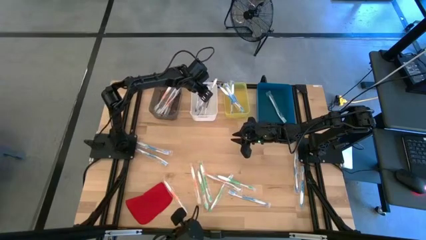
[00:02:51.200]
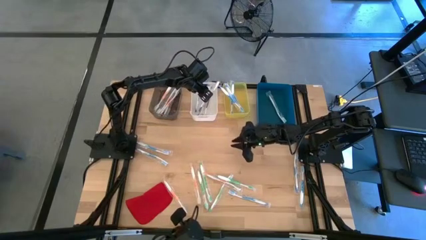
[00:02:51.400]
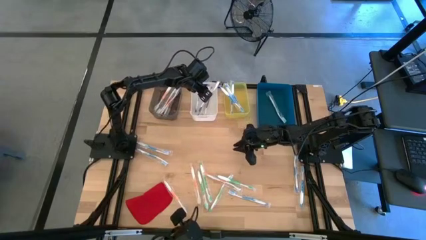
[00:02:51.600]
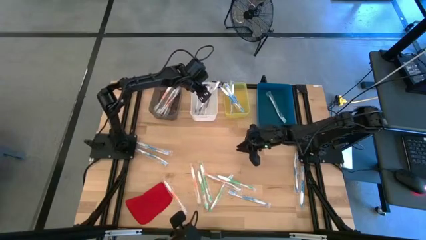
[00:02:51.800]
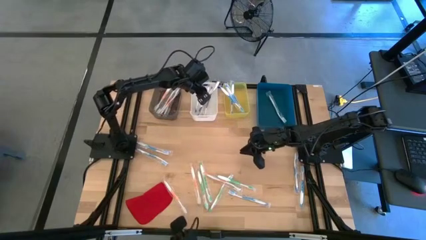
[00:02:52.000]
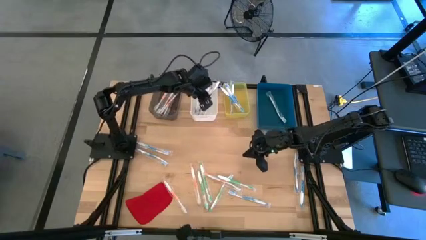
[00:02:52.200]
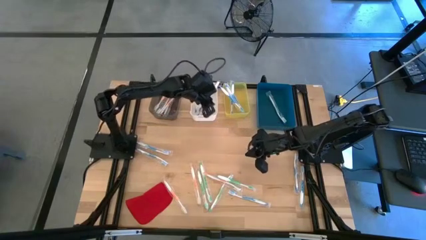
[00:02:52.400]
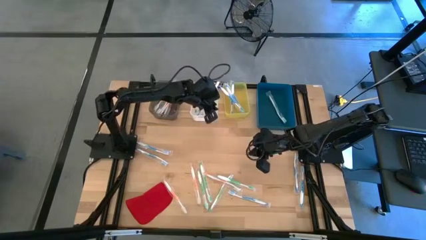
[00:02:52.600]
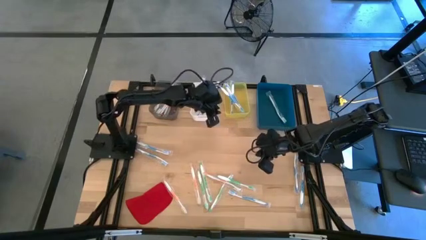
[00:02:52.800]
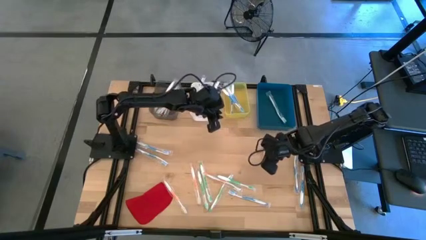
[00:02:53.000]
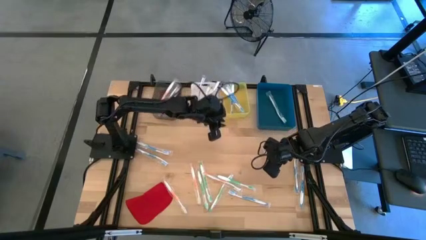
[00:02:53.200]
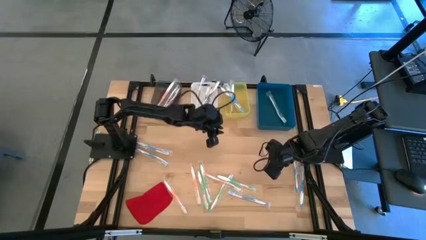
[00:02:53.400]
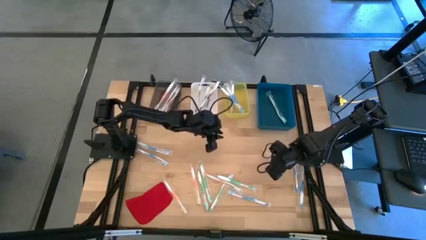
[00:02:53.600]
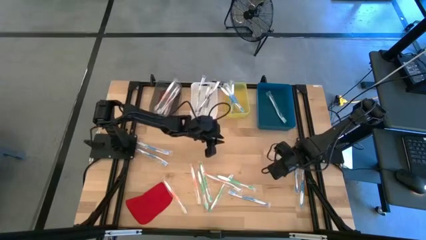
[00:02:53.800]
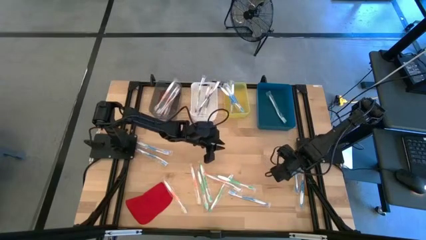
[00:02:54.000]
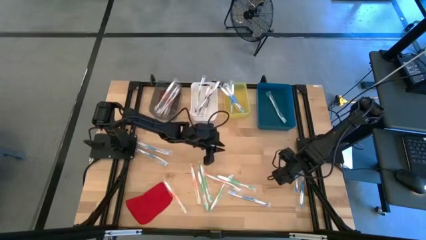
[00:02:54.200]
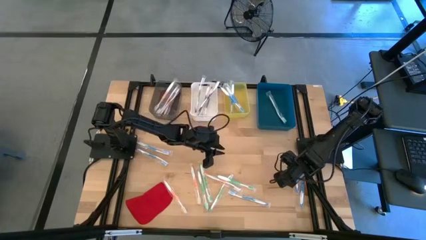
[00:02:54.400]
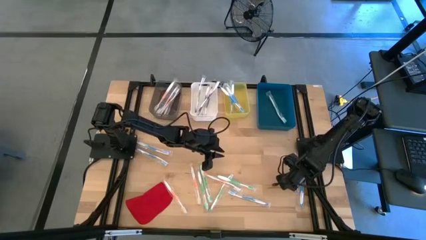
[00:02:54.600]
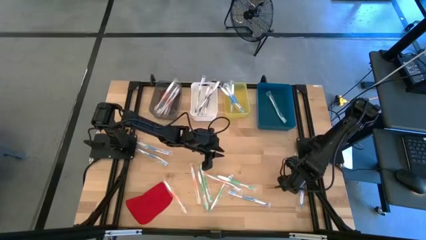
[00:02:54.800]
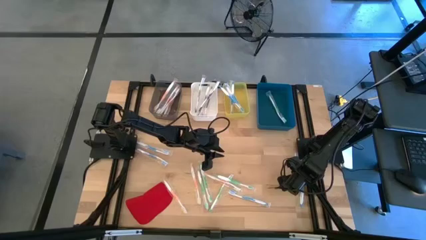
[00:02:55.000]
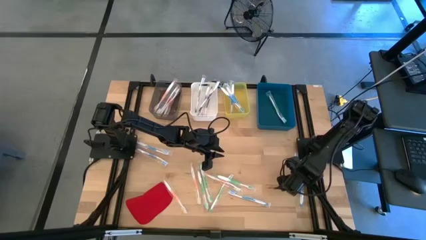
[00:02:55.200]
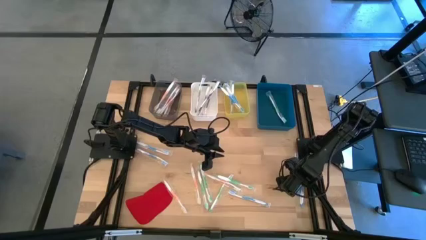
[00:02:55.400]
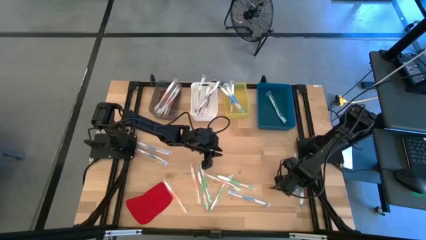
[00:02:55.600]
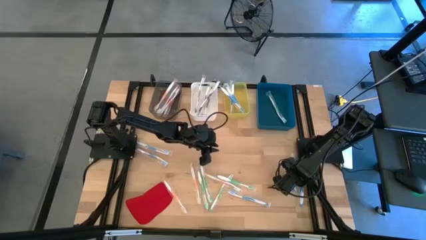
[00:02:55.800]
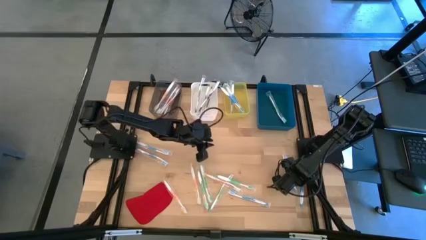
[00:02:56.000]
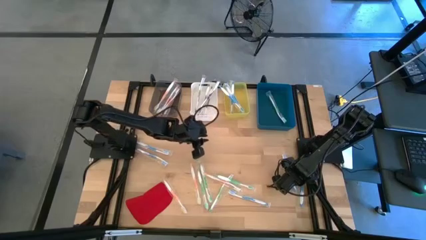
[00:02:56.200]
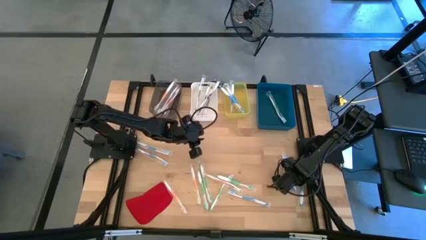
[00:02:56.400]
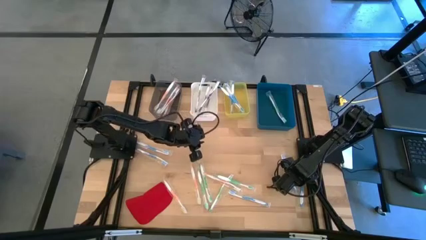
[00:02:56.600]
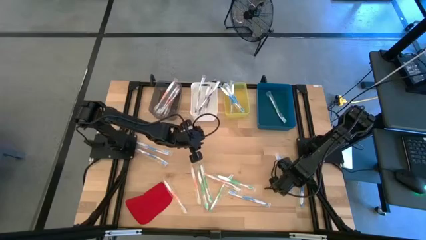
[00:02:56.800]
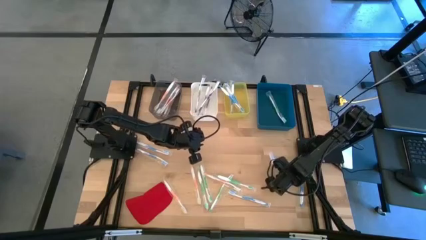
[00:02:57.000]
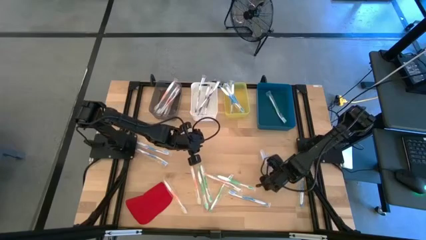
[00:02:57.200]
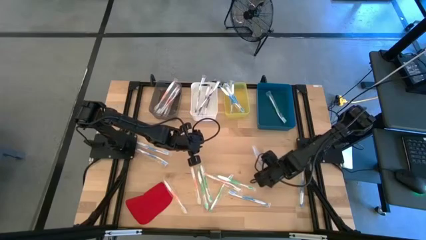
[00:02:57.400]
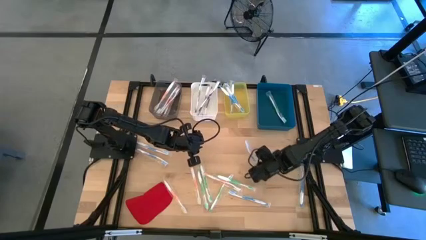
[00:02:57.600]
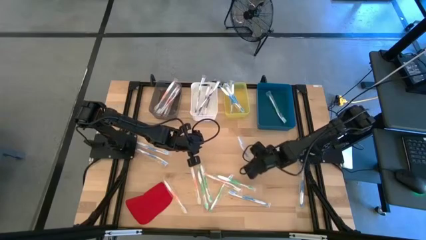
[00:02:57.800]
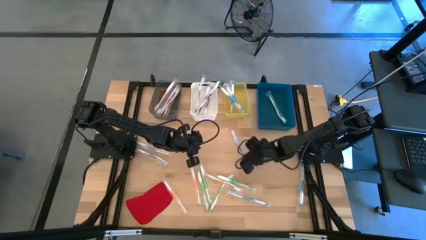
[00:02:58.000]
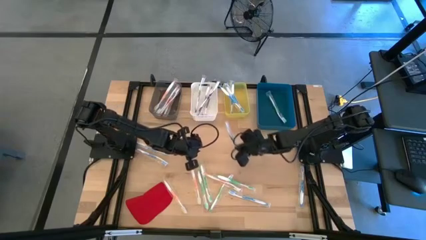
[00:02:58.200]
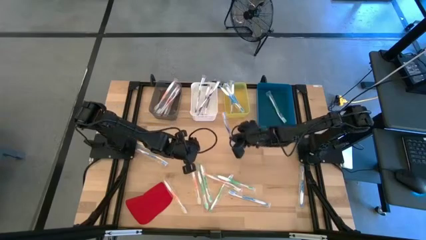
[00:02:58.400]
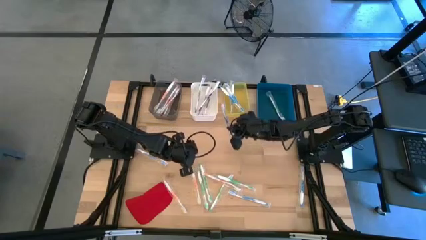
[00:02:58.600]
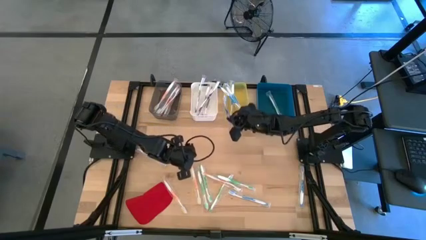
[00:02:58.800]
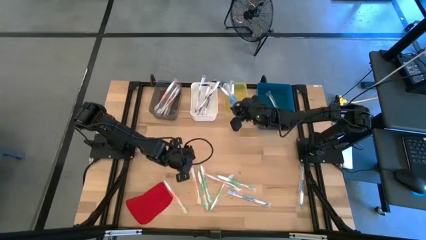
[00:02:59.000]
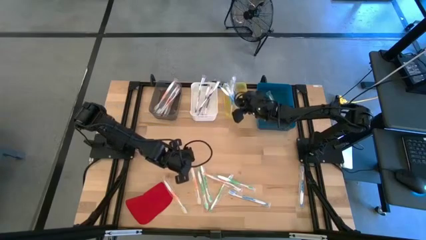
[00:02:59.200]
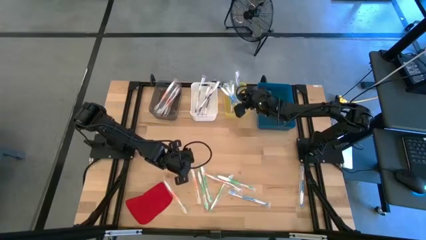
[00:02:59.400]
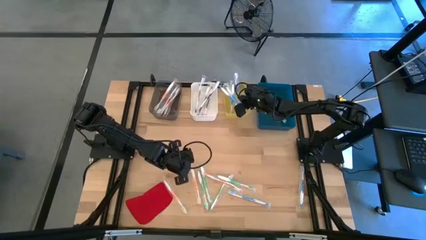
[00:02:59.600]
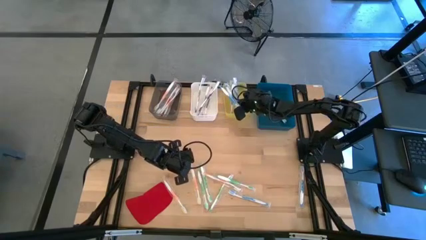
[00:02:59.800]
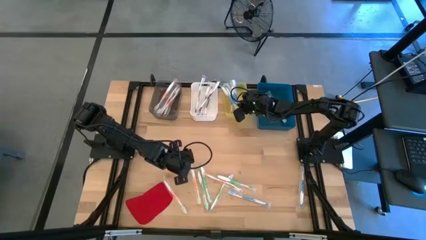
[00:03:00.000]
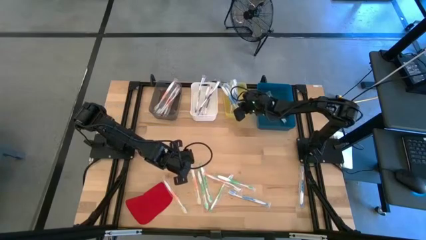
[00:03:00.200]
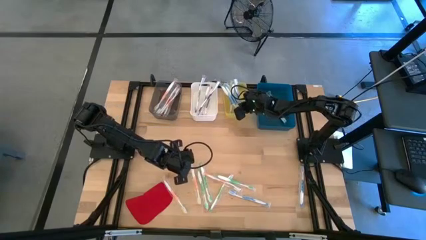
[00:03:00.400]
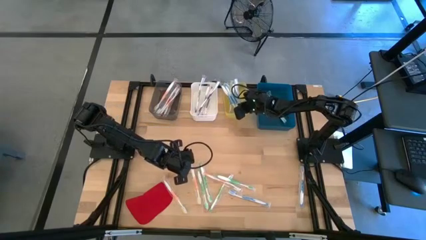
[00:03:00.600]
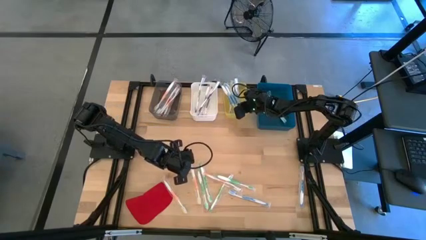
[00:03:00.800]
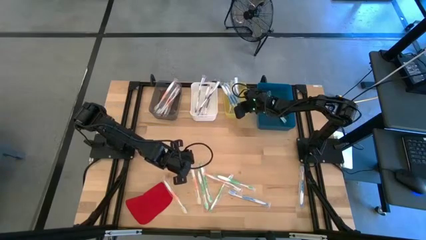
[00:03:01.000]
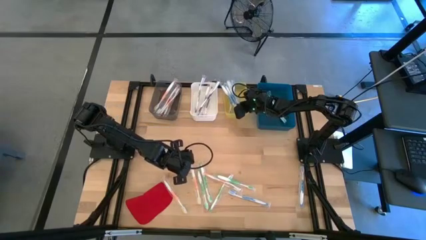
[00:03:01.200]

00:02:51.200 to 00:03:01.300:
Task: Pick & Place Toothbrushes
Put the blue toothbrush into the yellow bin

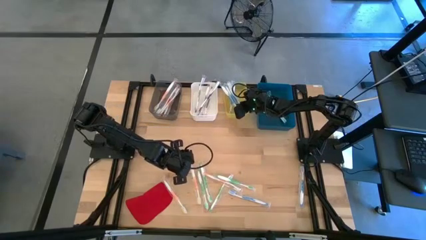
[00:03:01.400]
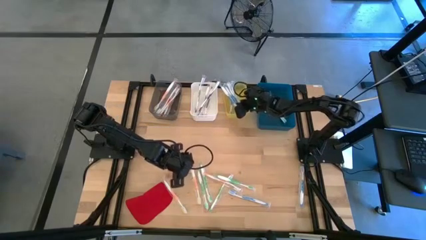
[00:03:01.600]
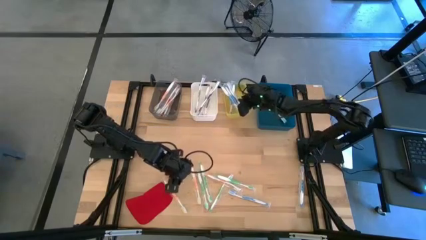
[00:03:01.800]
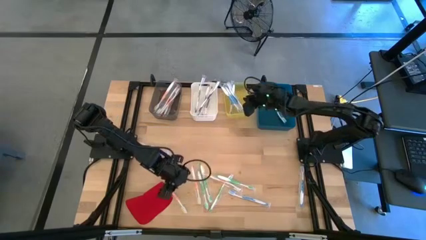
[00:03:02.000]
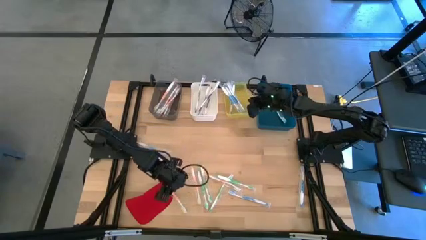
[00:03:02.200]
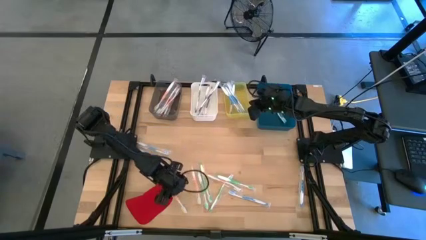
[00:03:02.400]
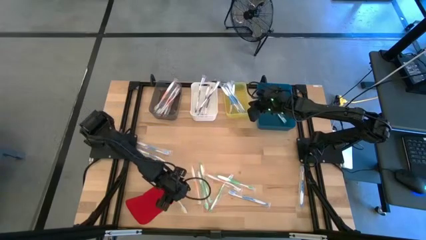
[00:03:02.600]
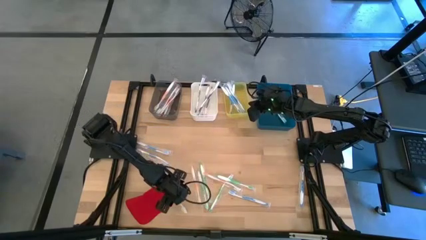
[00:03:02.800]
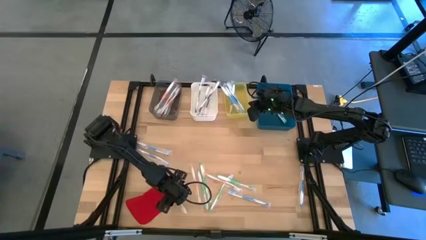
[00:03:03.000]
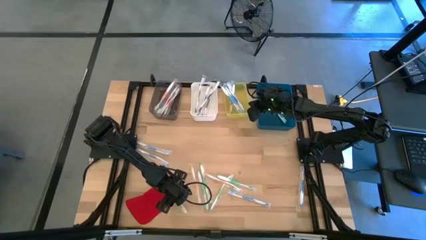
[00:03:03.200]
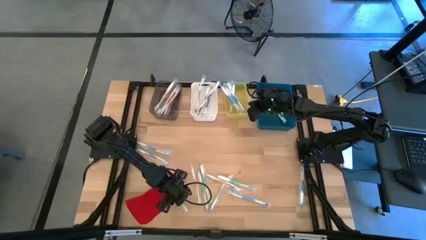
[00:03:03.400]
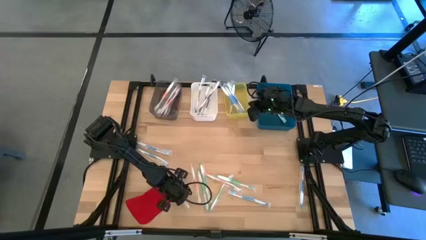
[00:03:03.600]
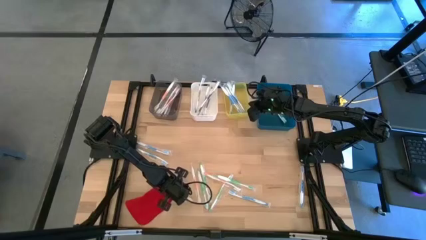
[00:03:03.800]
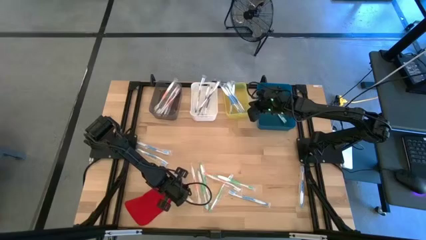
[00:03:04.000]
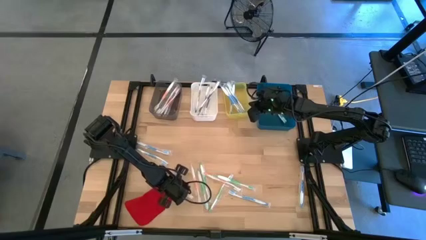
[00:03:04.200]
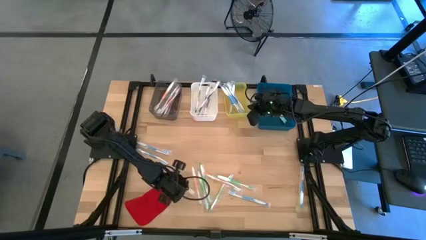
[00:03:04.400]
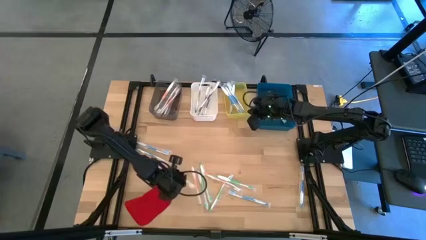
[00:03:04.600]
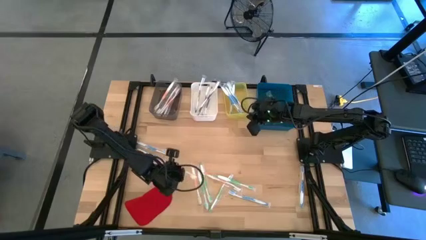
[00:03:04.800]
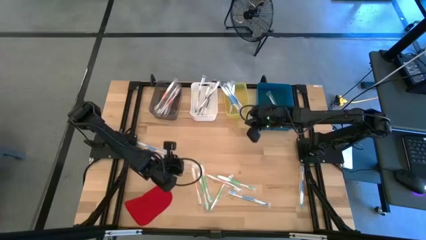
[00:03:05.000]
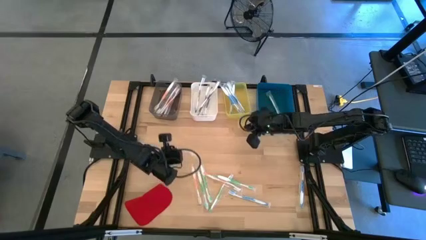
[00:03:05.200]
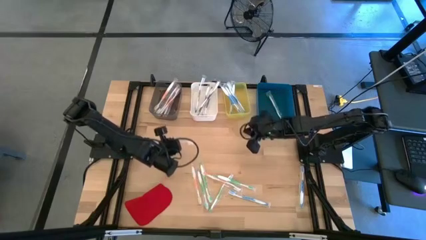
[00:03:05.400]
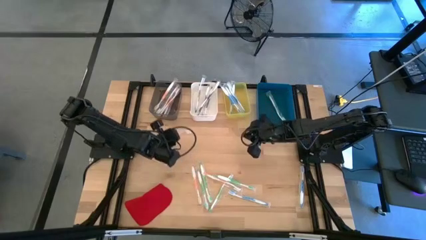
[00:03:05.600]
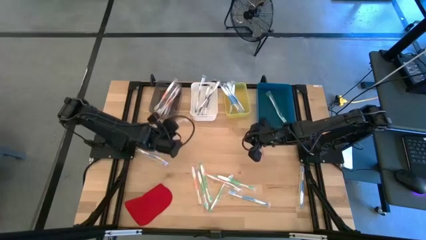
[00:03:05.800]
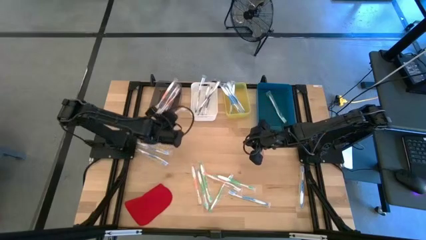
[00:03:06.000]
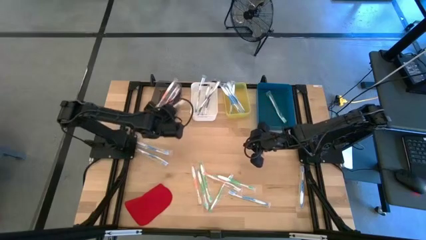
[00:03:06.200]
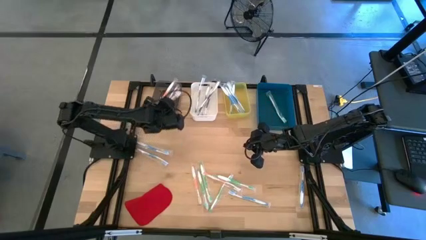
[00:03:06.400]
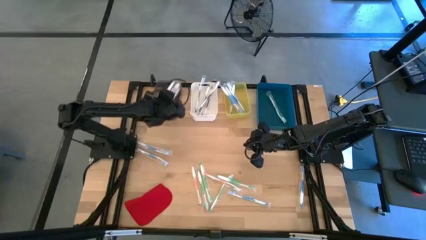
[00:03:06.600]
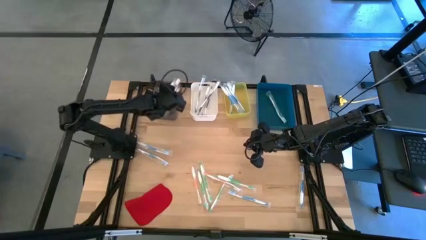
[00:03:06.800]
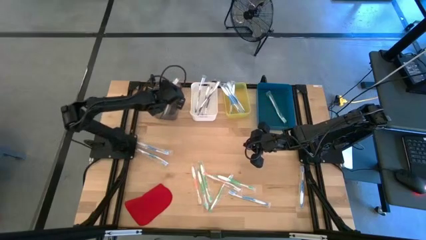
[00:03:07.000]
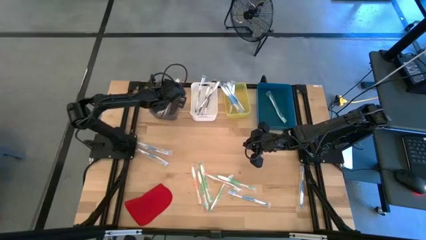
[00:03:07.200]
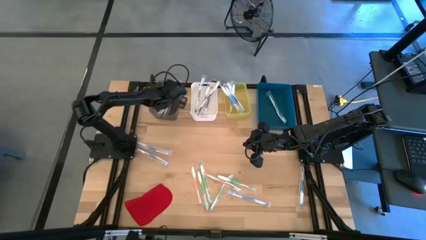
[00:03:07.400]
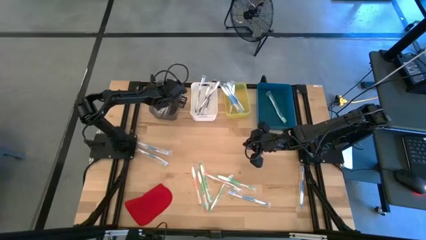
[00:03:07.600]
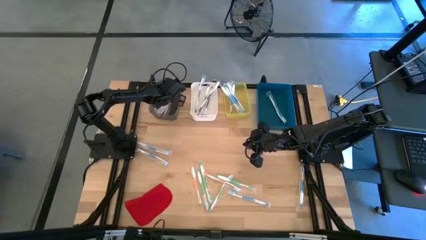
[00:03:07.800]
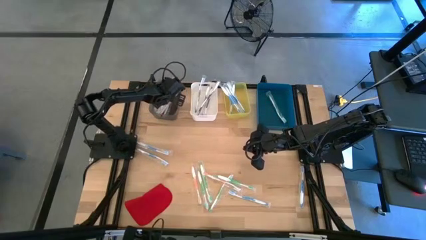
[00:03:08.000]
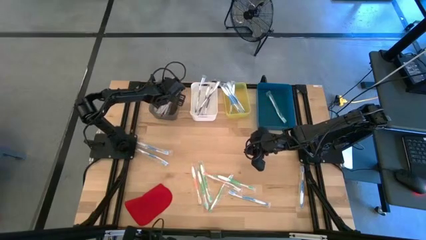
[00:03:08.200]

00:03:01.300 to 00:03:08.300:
Put the orange toothbrush into the black bin
